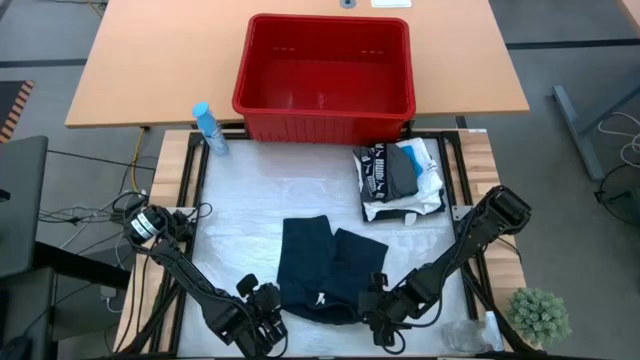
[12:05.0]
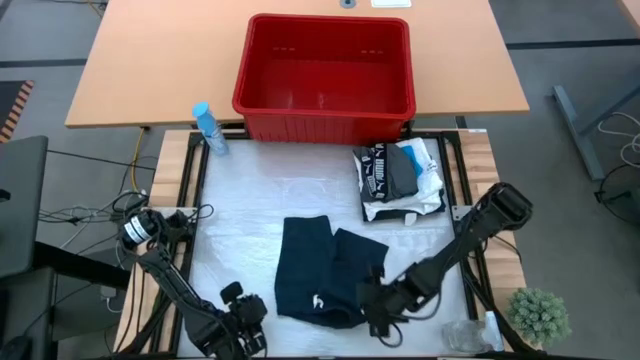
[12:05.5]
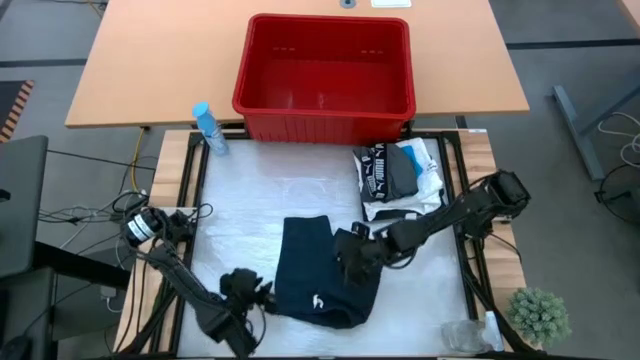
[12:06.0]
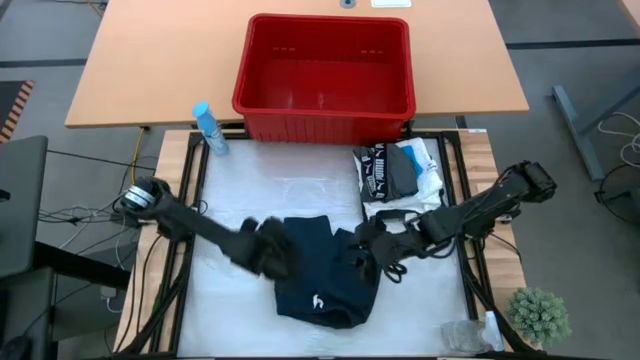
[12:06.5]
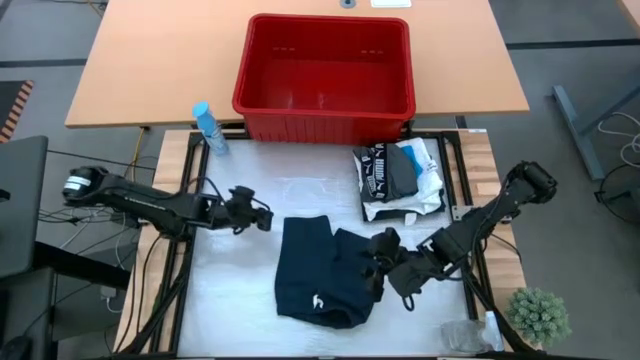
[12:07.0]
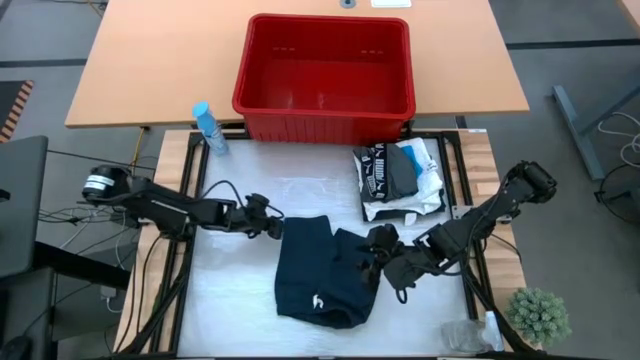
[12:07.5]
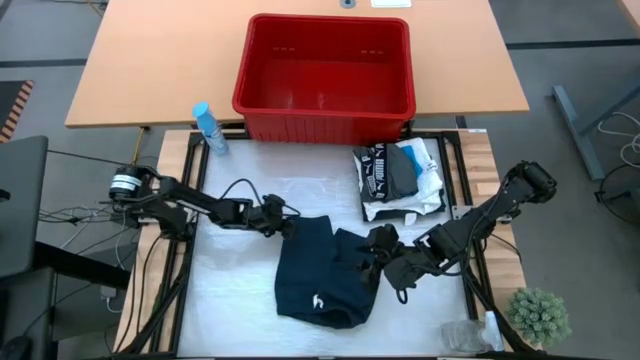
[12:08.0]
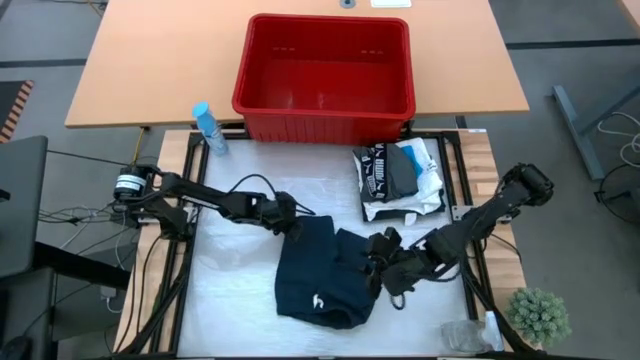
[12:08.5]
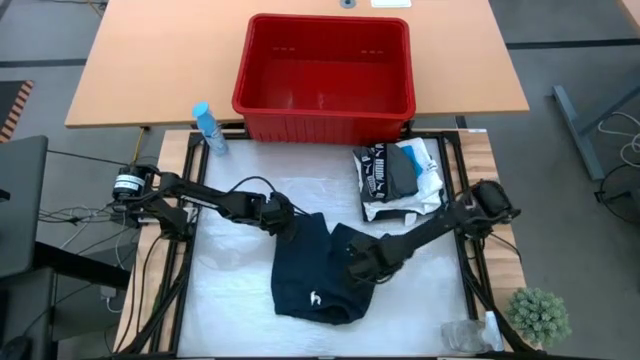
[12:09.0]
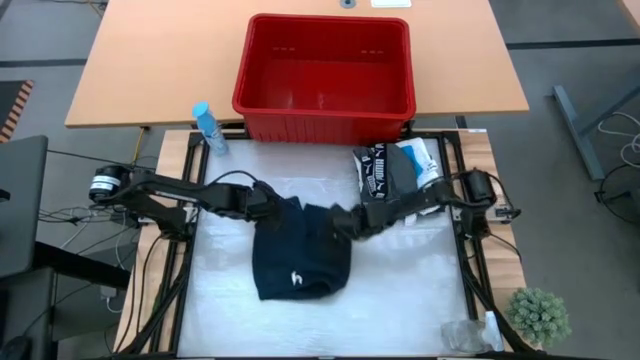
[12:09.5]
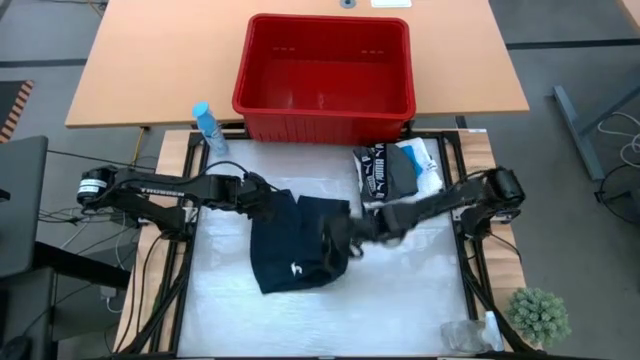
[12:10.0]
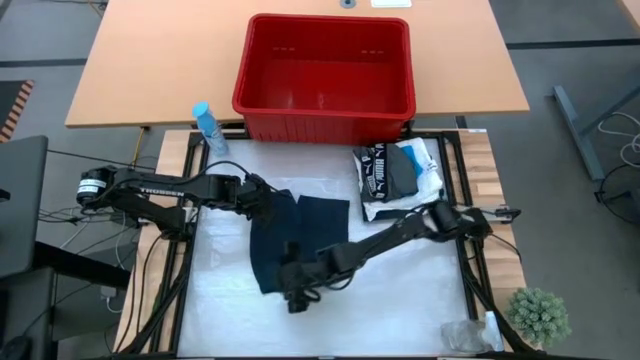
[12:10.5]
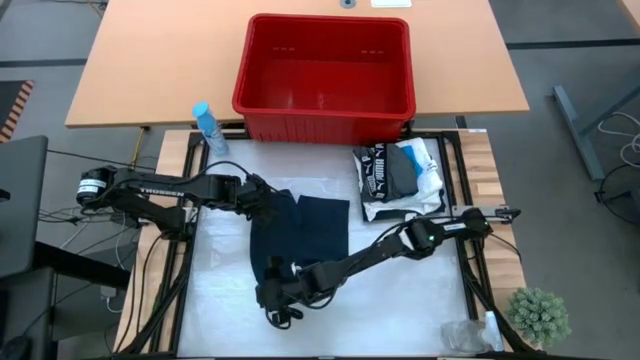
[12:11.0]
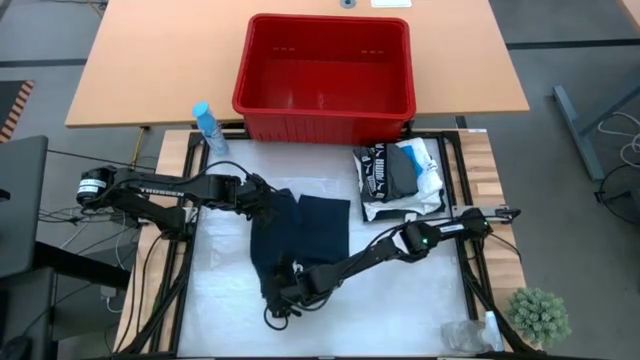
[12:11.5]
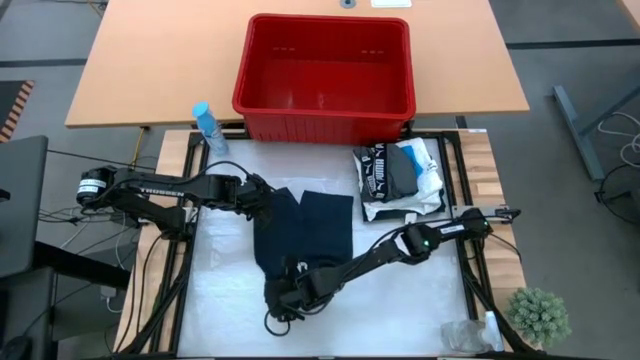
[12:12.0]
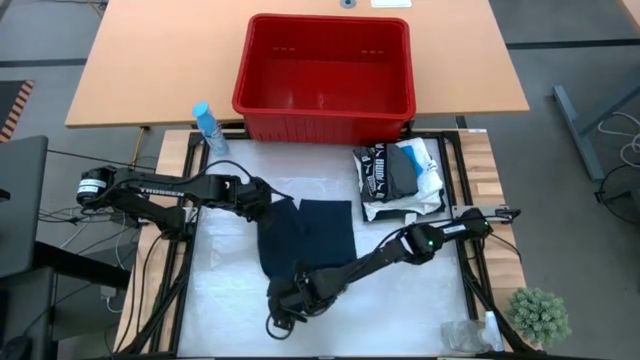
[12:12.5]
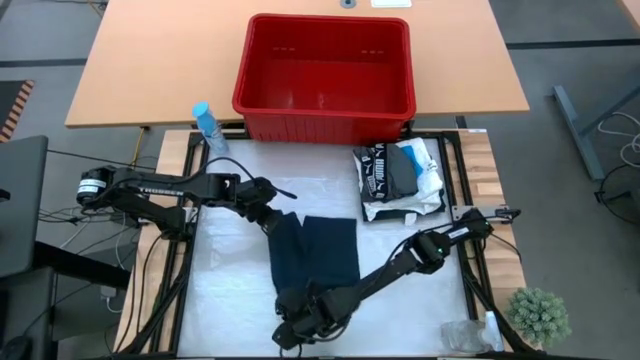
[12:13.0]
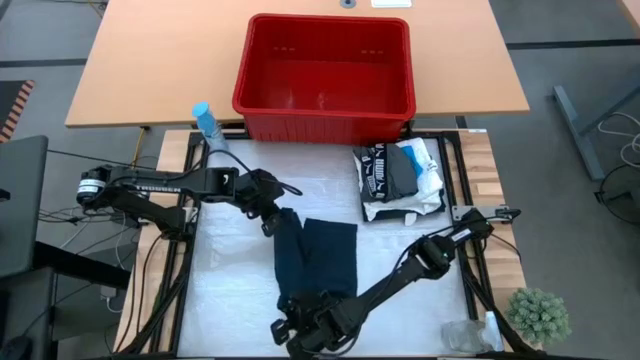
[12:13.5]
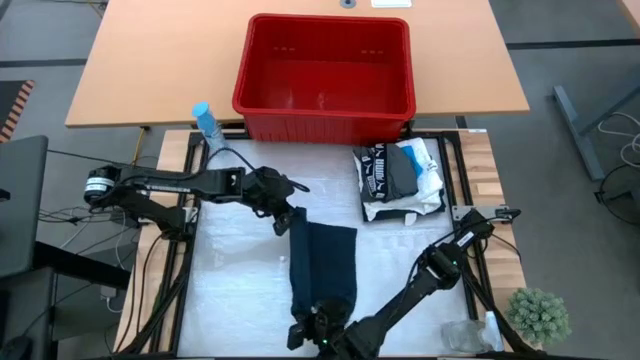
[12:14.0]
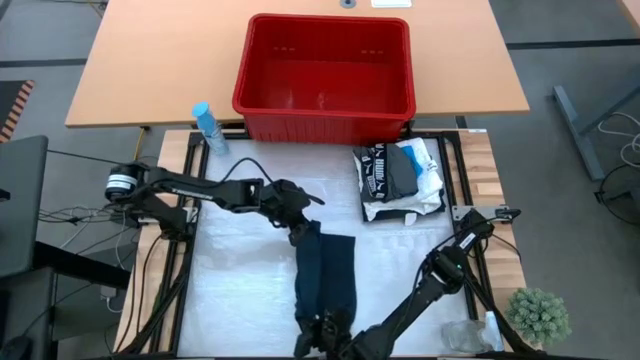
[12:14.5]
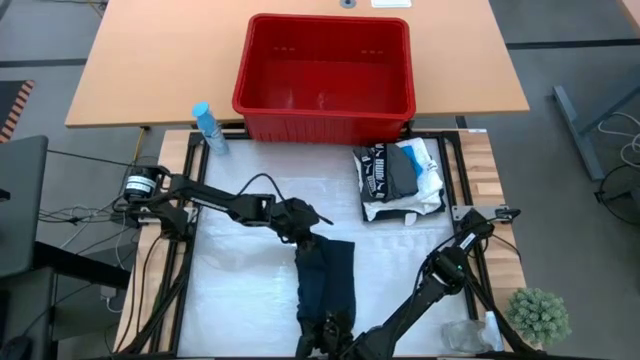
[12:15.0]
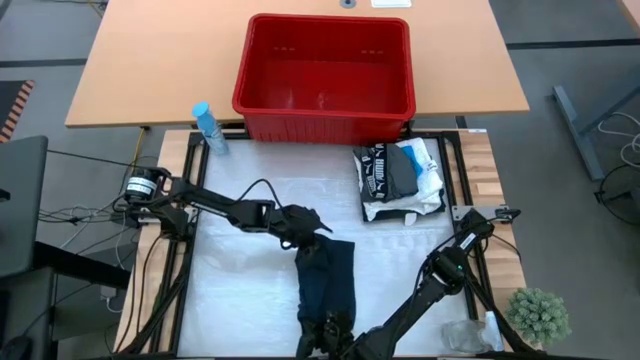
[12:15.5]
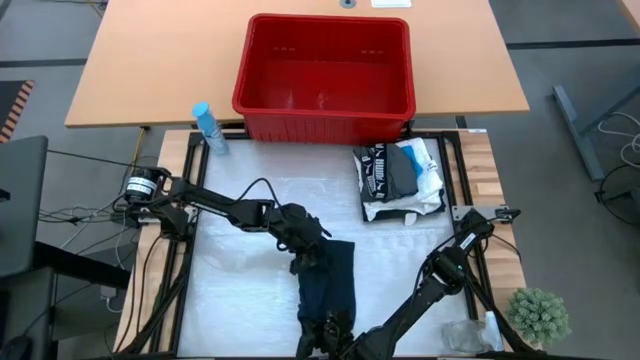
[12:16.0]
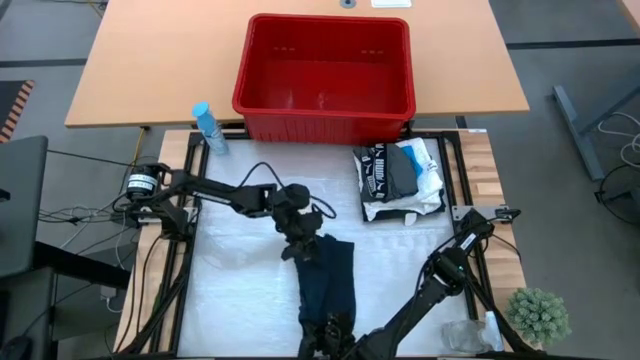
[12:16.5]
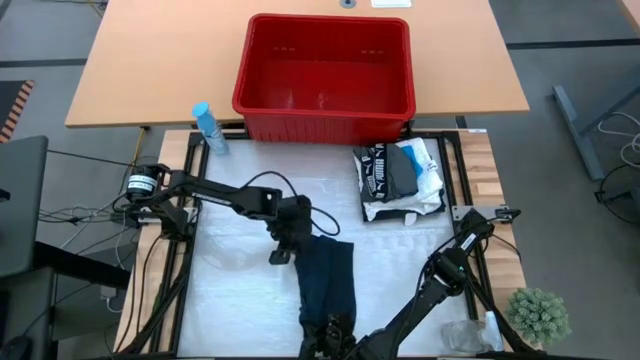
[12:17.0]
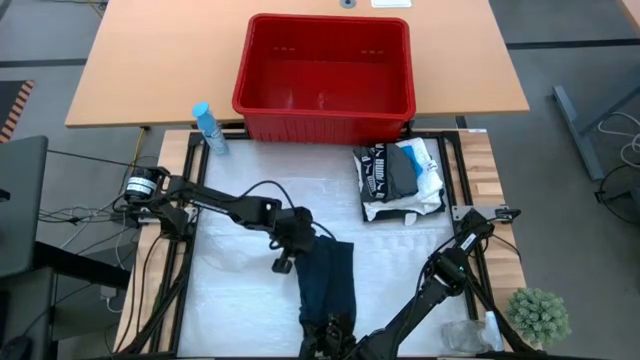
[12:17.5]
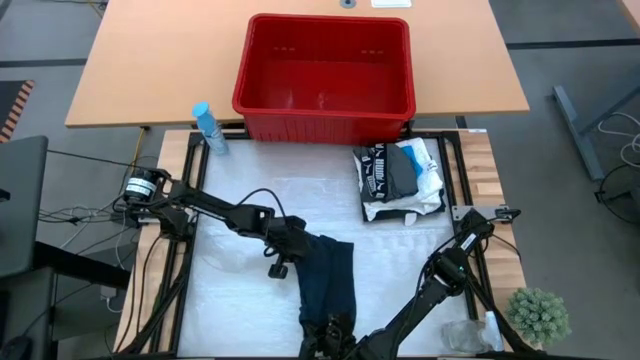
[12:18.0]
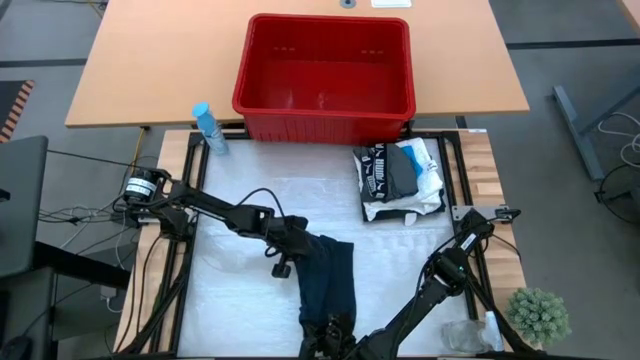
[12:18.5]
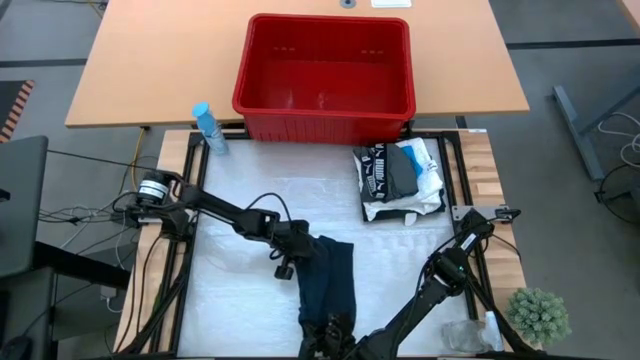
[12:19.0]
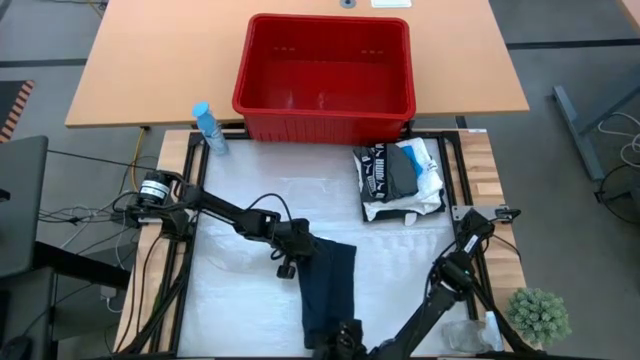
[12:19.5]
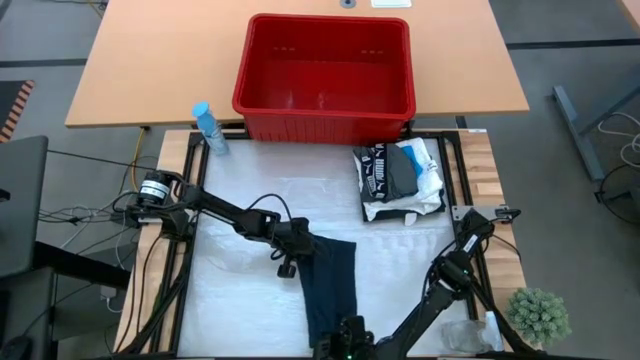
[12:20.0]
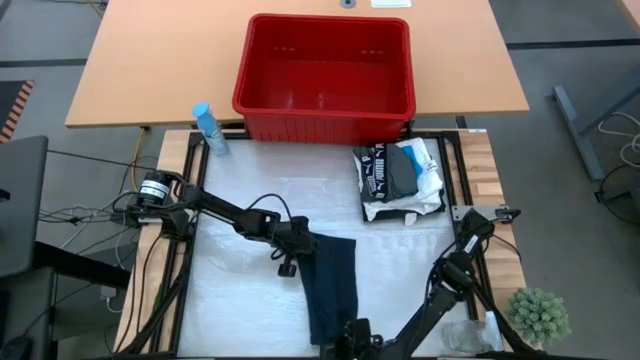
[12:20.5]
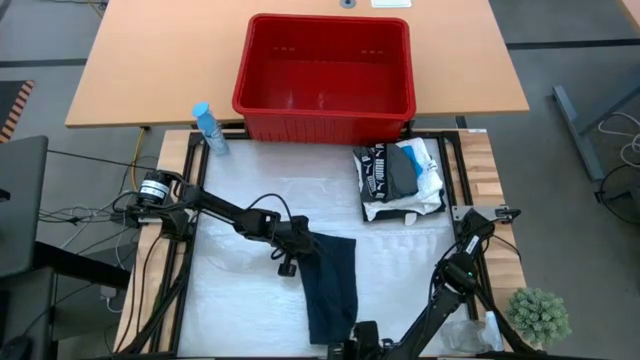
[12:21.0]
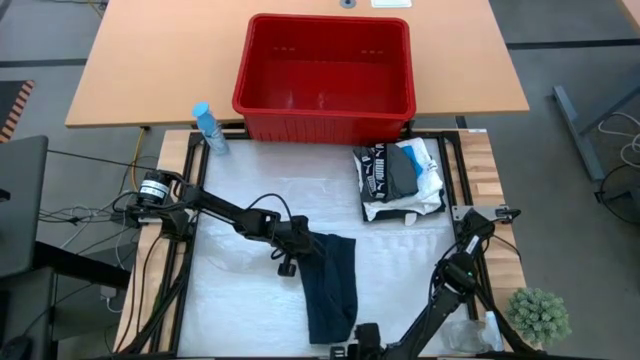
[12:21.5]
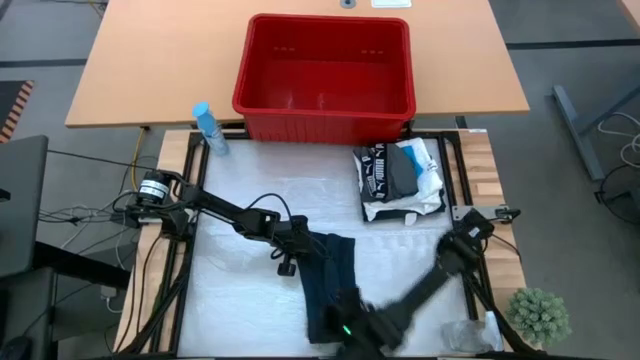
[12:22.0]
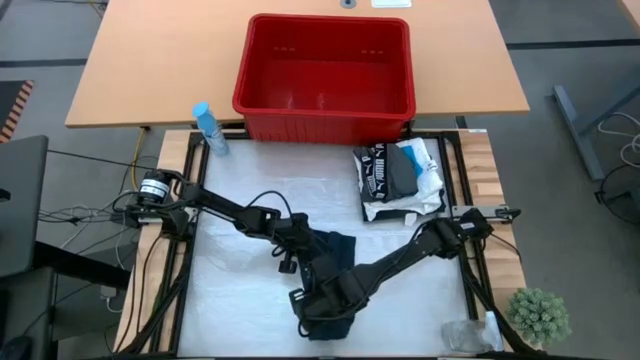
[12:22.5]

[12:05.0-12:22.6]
Task: Fold laundry
Fold the black shorts

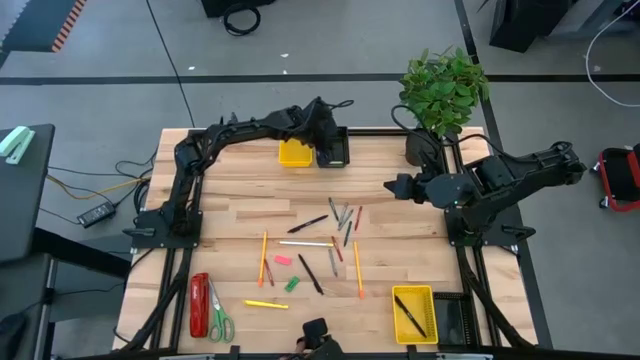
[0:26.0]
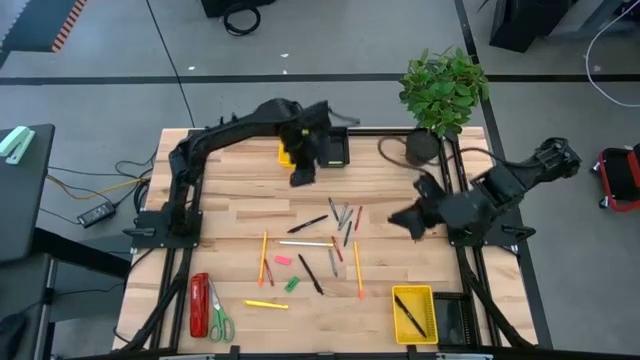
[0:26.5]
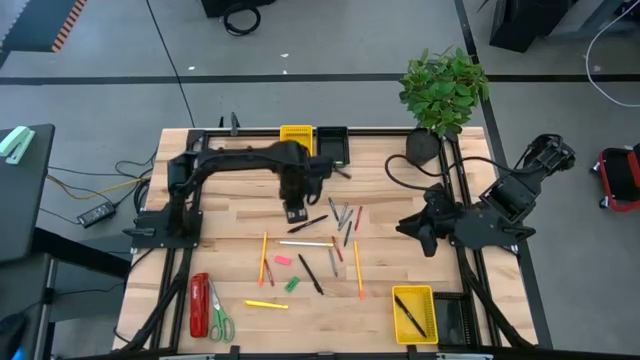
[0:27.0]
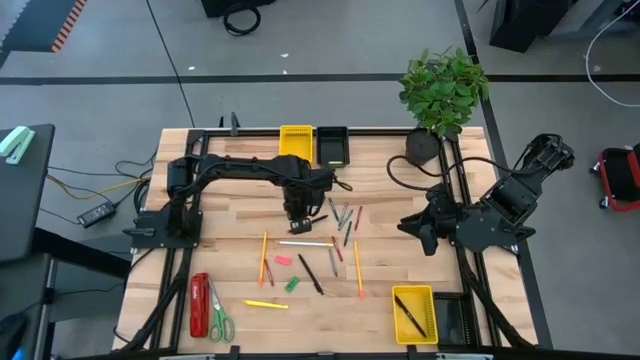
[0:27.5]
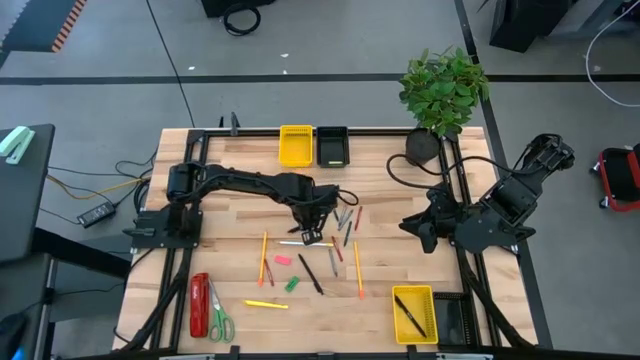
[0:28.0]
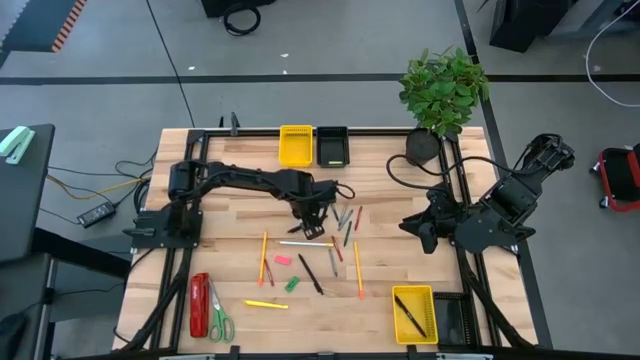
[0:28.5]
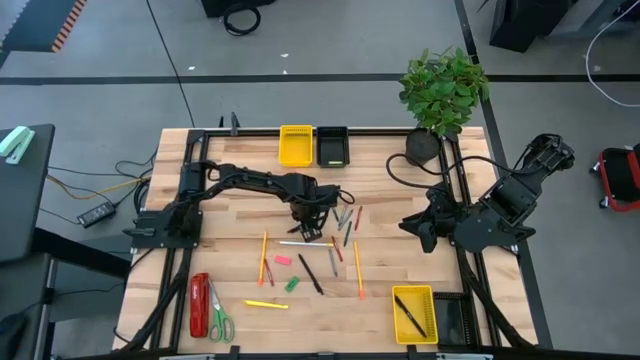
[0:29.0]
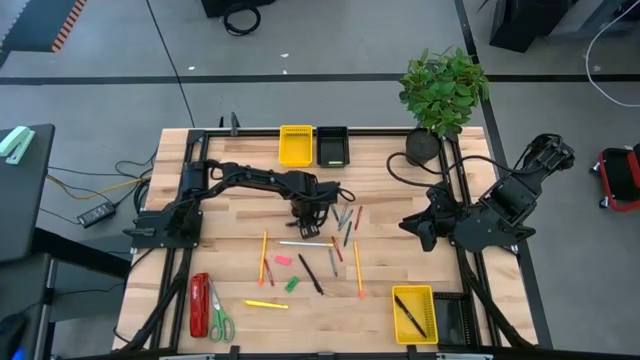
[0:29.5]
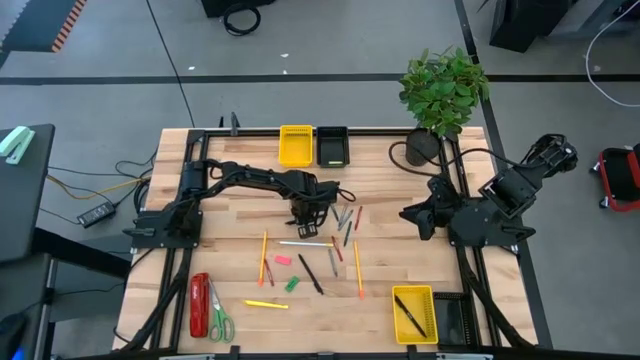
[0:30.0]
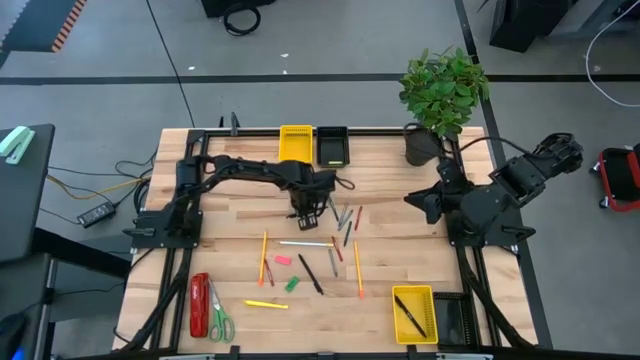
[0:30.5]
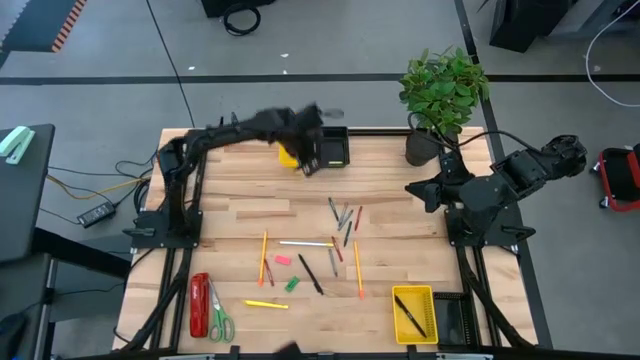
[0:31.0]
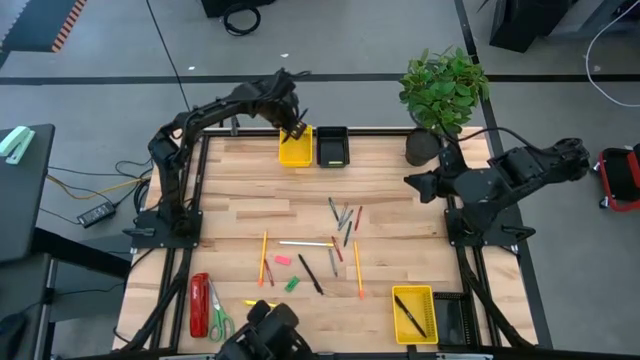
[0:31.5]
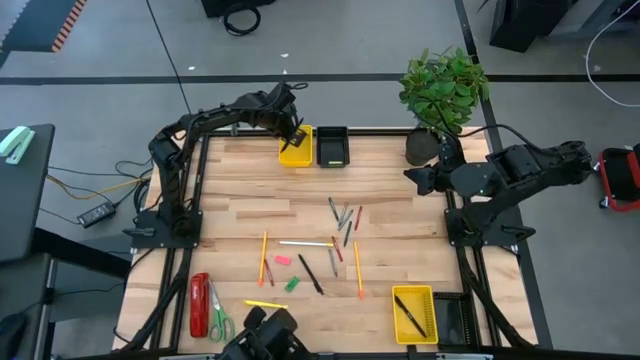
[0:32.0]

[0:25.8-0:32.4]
Task: Sort crayons/erasers/pens/pencils in bins
Put the top black pen into the top yellow bin
